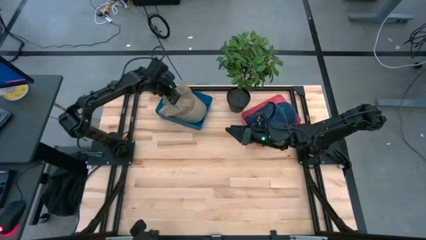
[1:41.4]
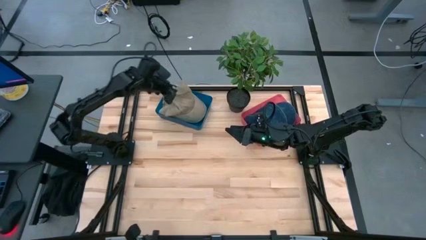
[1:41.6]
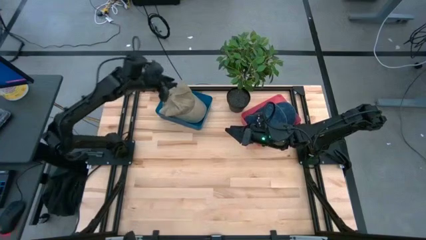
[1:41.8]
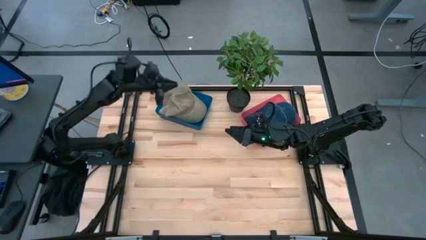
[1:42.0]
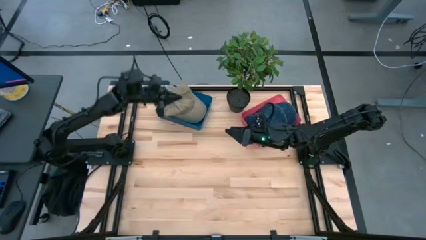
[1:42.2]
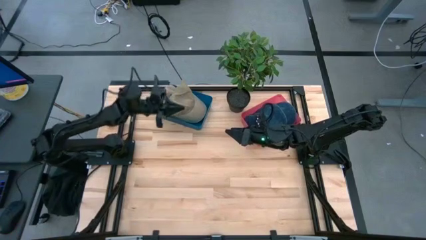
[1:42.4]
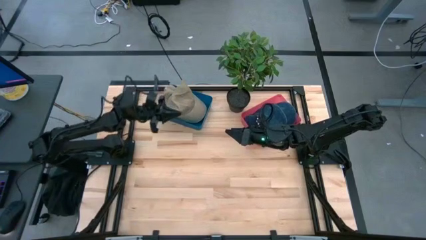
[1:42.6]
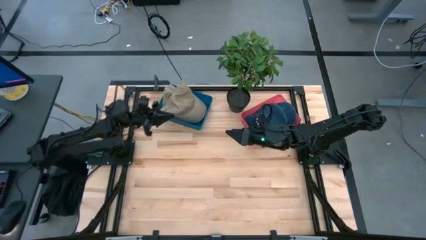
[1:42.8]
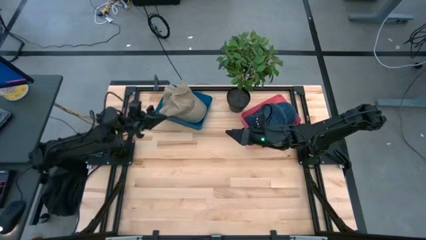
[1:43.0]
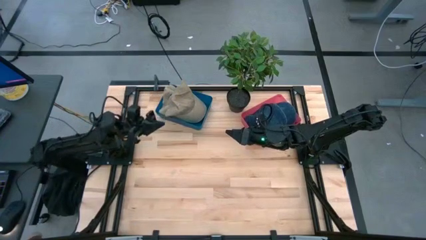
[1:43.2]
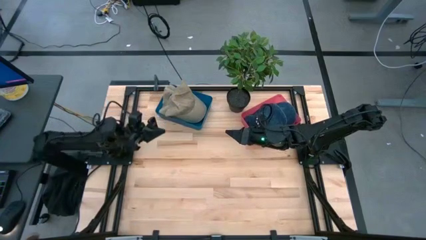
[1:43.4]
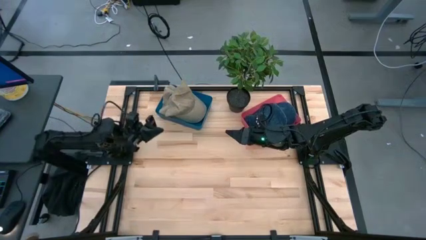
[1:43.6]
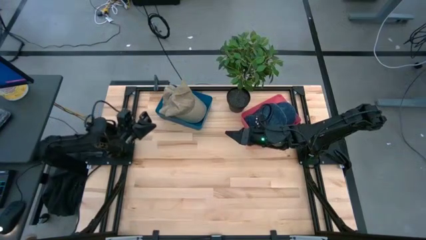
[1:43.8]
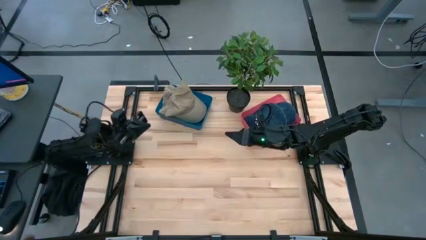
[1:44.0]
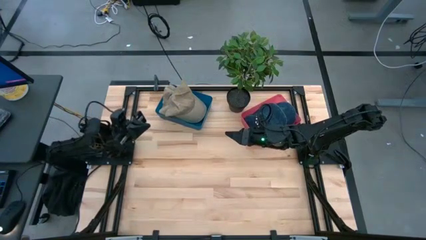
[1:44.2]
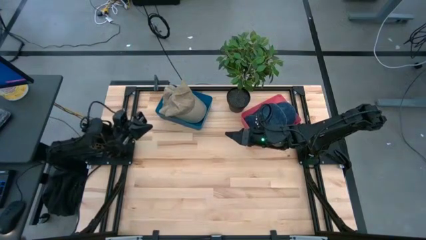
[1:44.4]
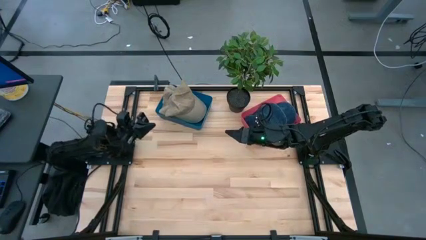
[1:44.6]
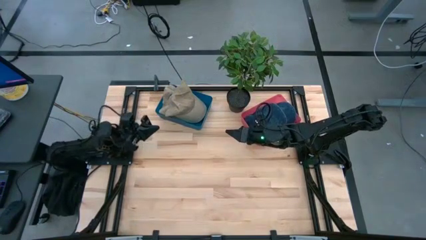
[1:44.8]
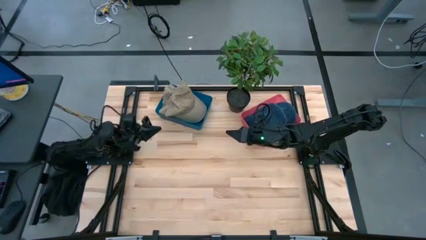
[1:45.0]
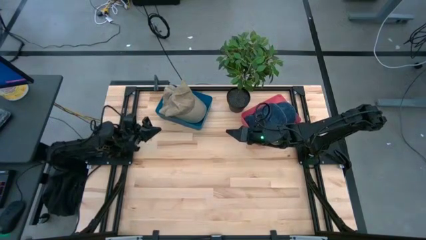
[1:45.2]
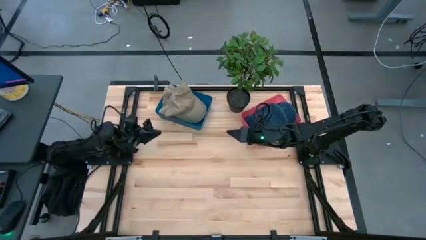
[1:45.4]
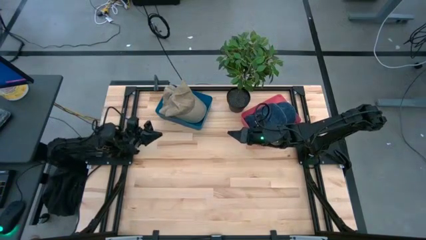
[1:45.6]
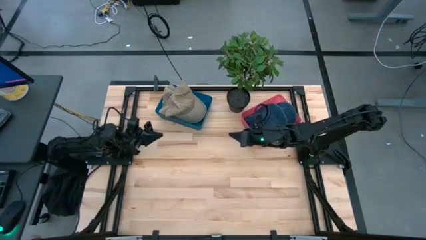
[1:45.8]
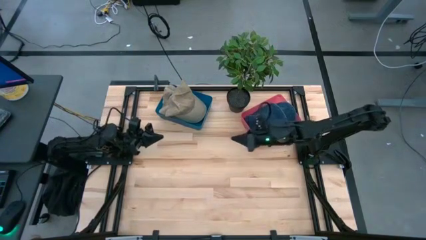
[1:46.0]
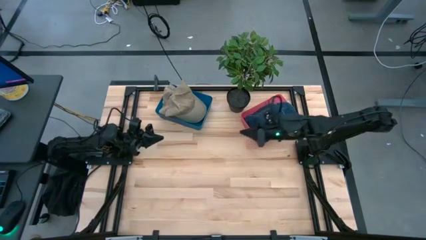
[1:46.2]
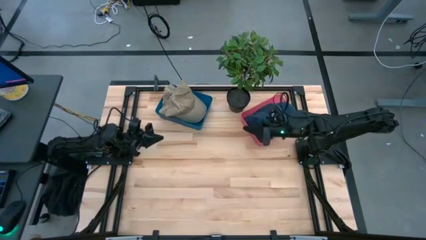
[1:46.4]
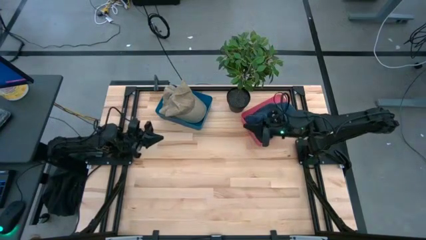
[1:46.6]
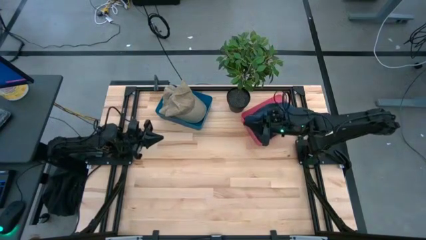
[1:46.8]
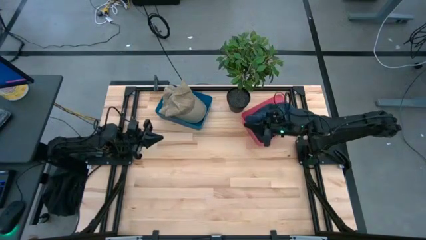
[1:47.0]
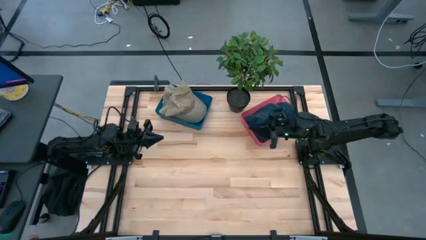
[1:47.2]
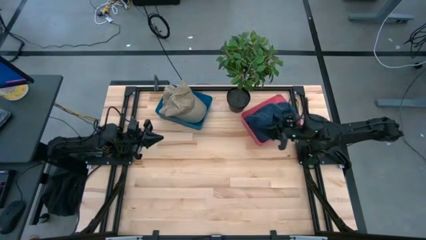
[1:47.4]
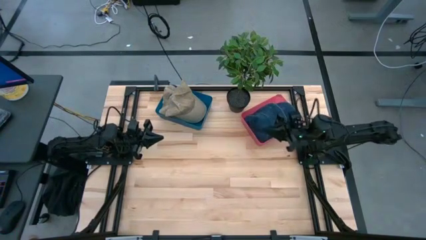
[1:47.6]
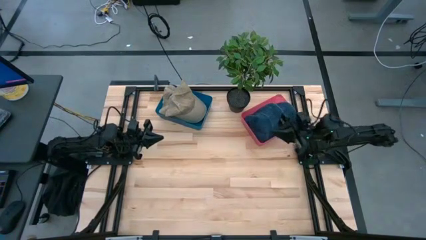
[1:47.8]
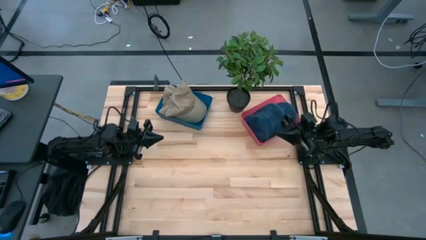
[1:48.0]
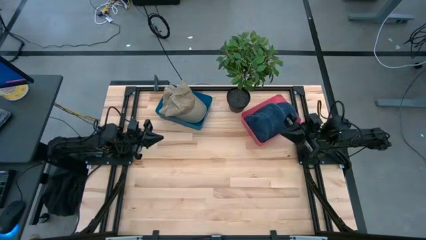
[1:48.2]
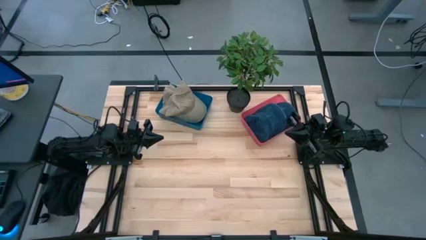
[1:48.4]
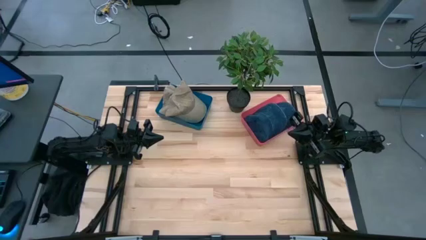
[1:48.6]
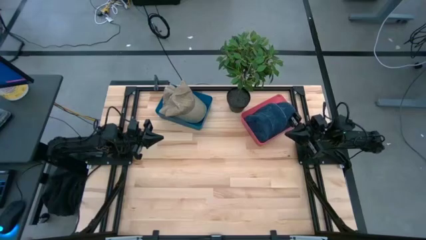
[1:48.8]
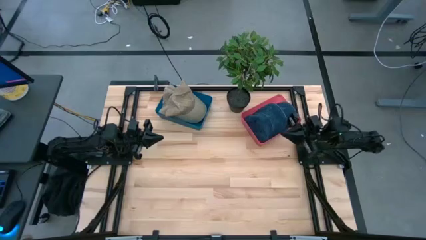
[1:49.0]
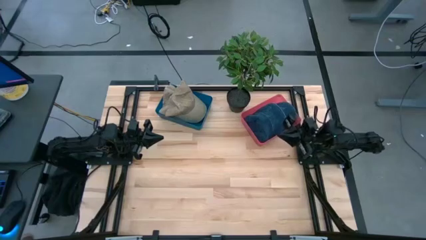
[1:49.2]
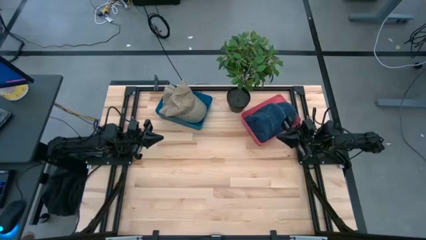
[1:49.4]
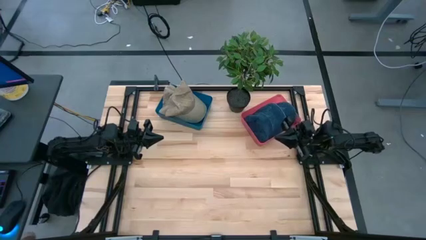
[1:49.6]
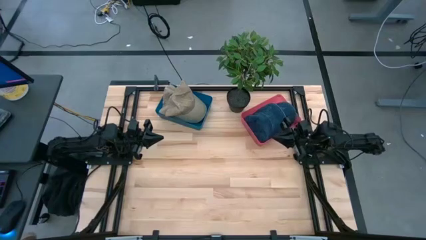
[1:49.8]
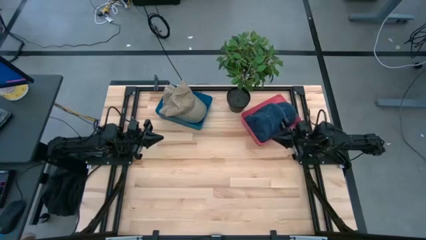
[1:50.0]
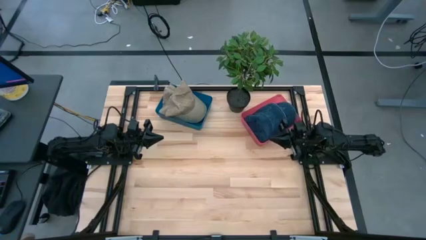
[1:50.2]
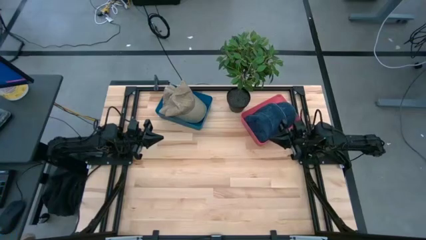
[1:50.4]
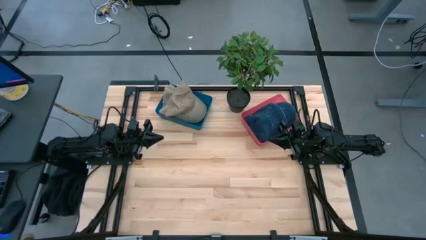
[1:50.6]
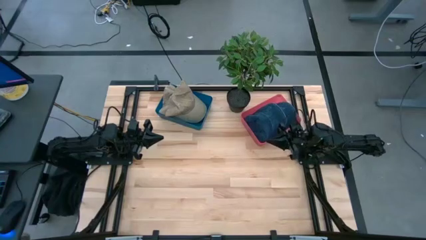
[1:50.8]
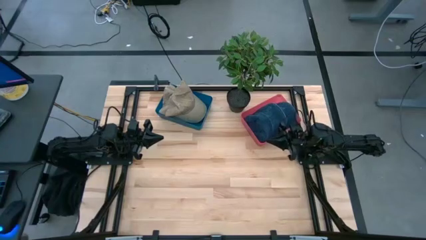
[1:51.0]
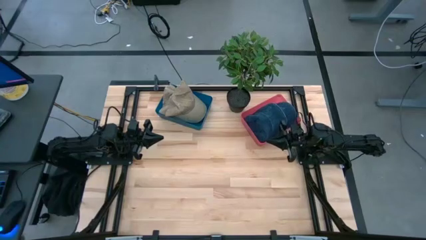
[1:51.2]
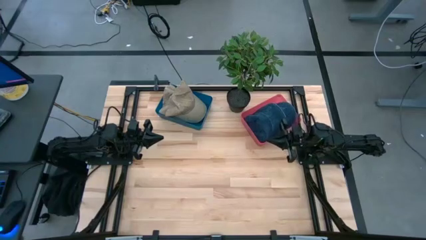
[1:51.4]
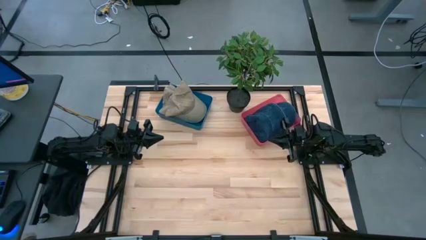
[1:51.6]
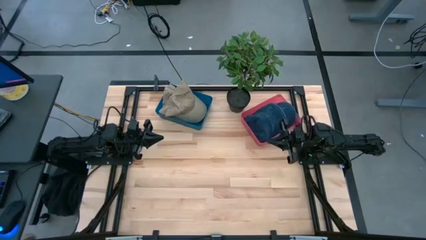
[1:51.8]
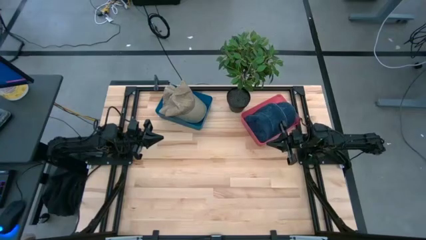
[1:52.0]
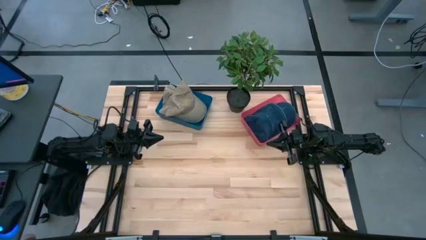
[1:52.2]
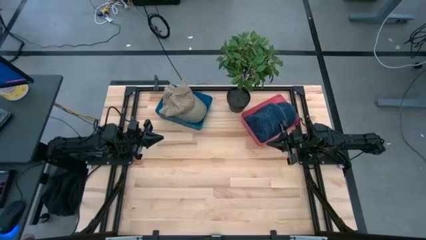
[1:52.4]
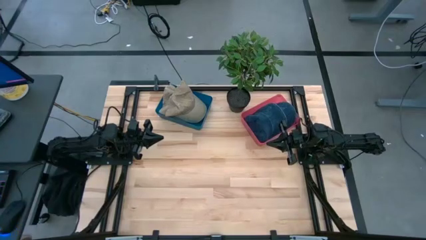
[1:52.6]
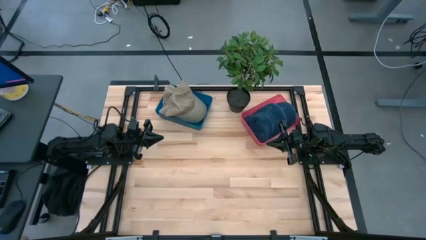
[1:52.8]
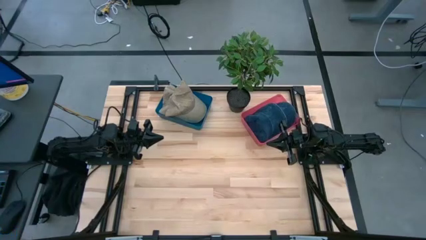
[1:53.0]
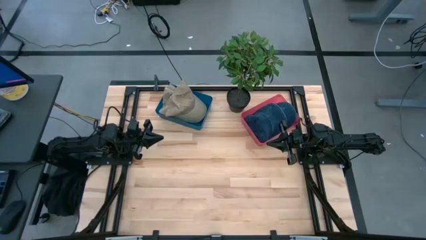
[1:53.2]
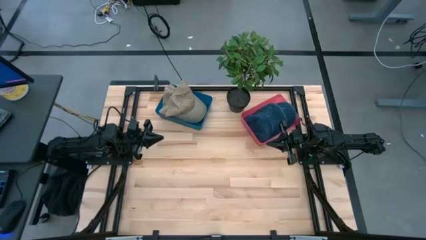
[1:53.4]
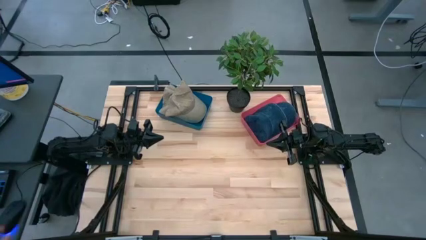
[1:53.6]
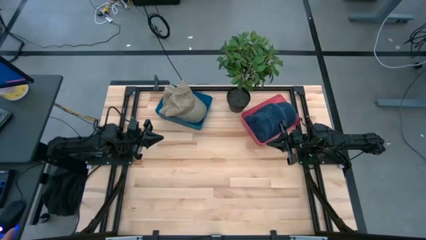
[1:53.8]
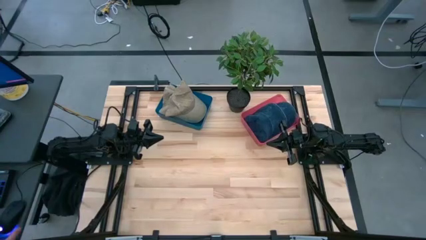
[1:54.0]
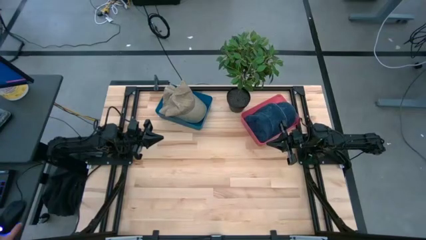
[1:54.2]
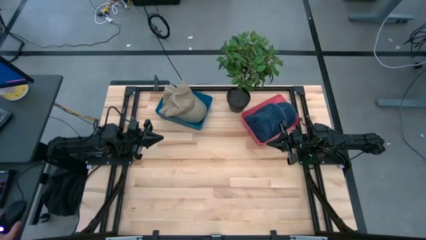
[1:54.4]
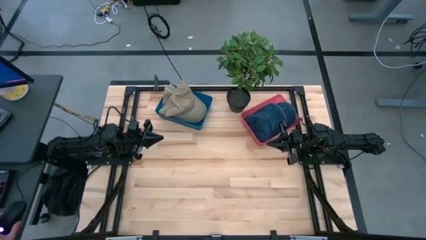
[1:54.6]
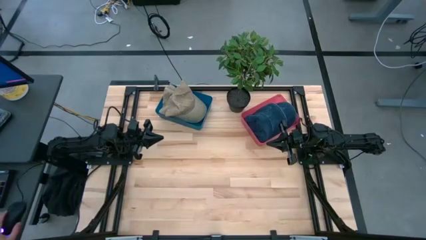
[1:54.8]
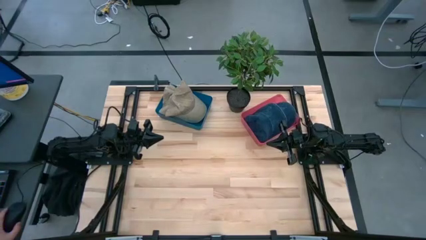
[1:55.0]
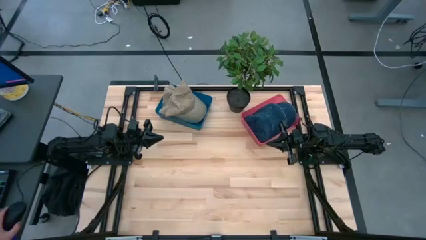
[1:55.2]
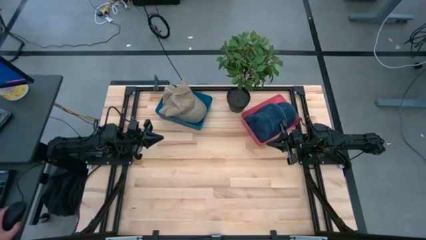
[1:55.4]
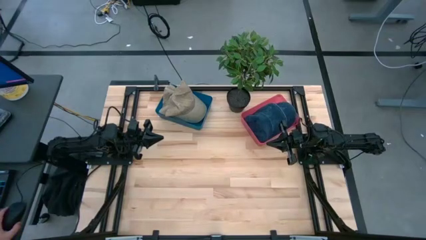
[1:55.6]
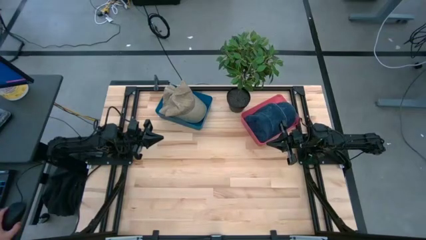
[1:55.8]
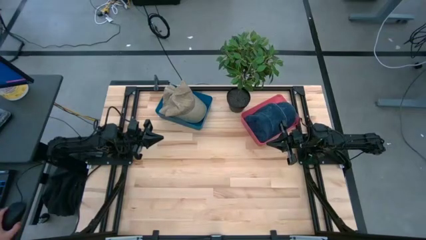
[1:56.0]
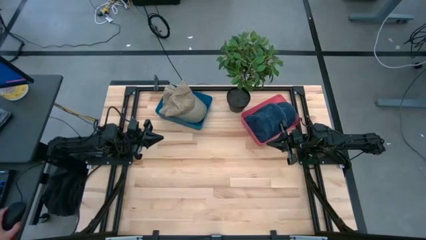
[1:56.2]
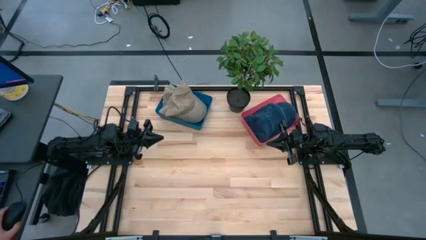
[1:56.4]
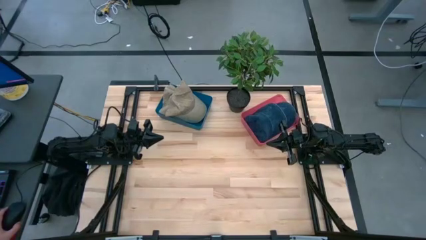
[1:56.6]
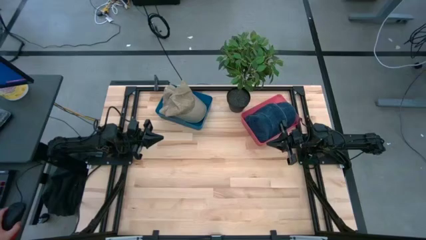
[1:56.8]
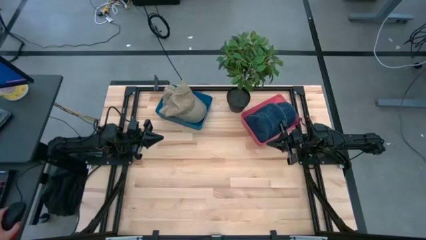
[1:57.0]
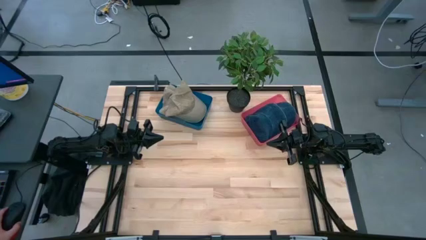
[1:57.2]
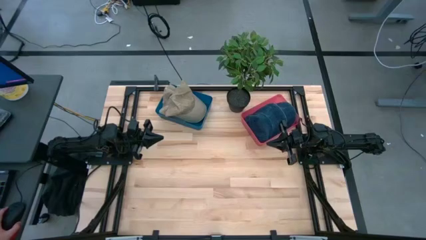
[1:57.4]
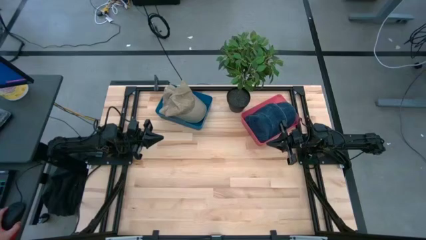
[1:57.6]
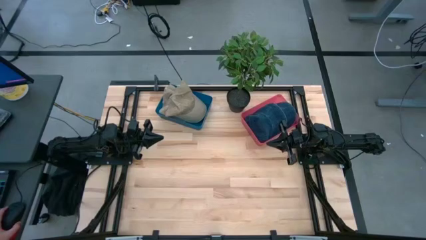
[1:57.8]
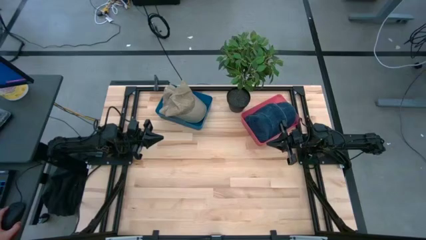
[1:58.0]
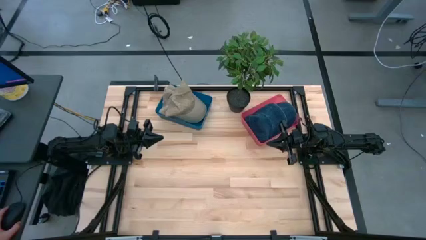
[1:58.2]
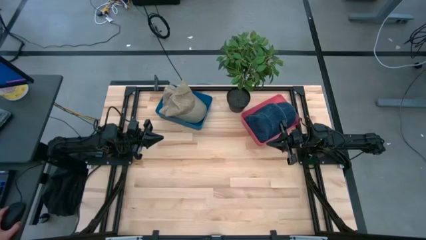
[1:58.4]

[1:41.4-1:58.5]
Task: Pick & Place hat
Return to Home Position
